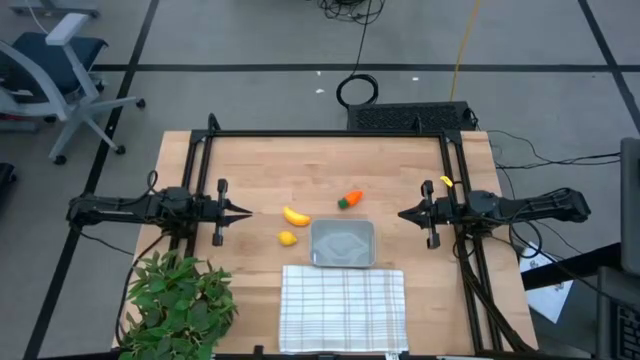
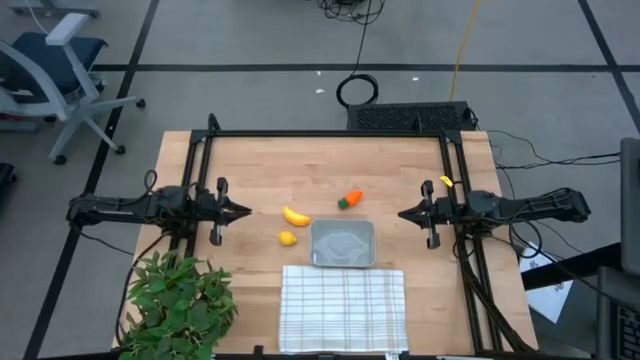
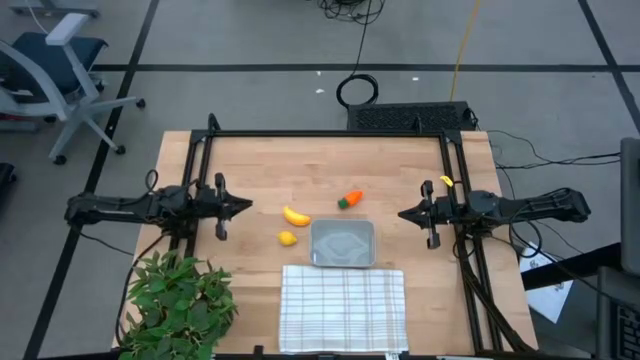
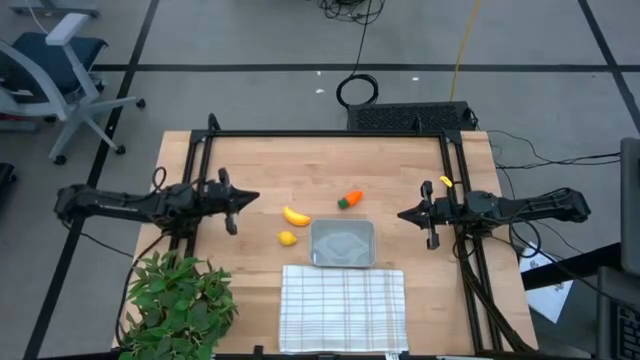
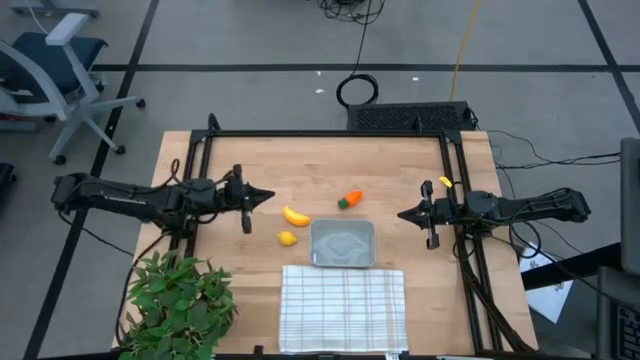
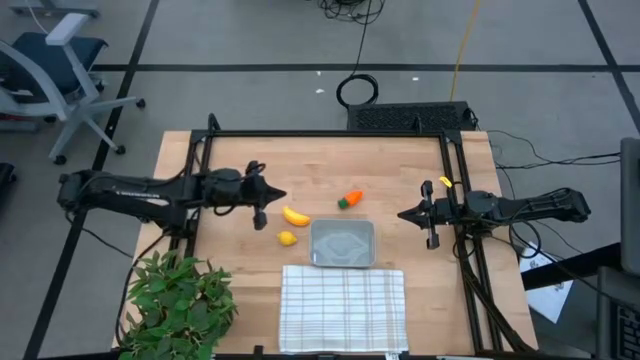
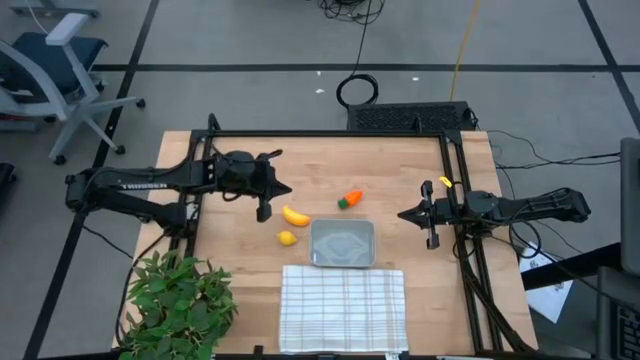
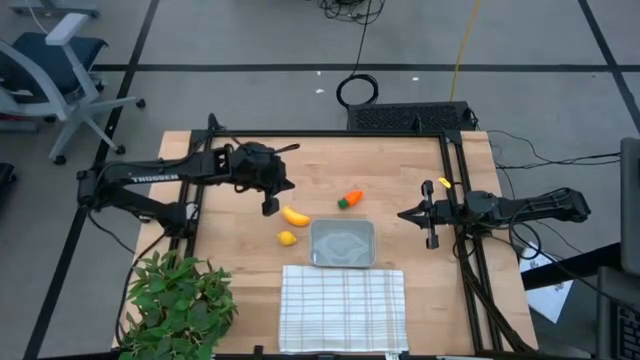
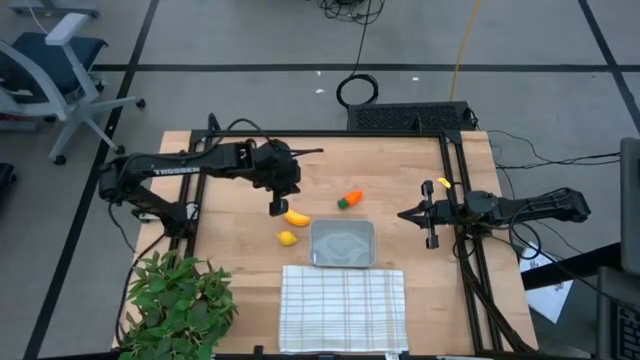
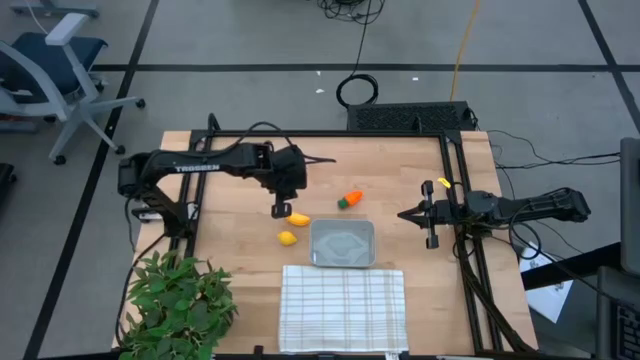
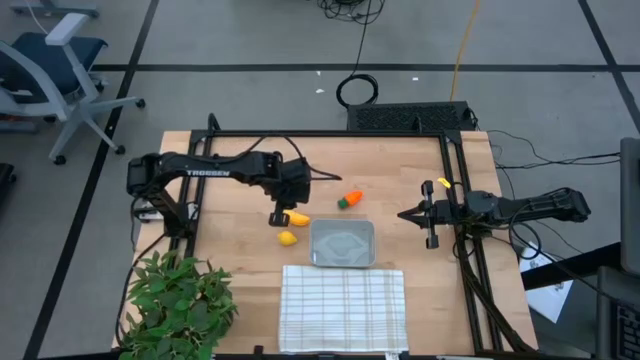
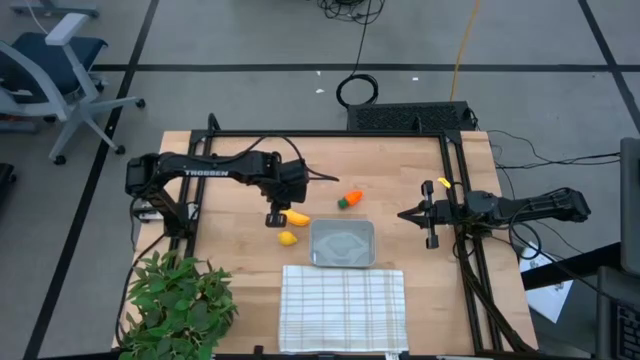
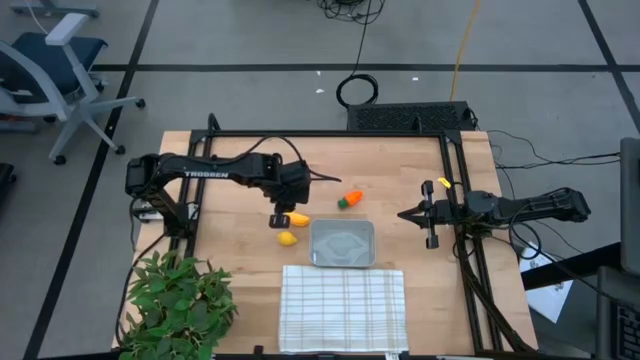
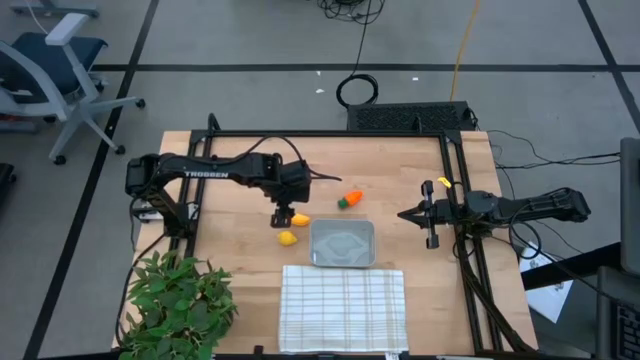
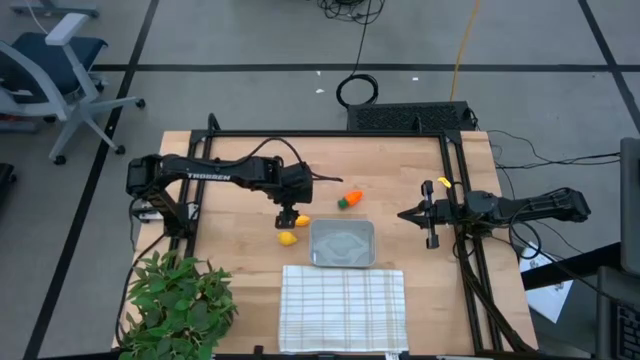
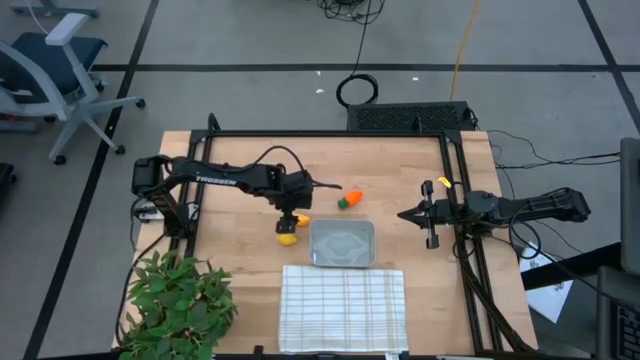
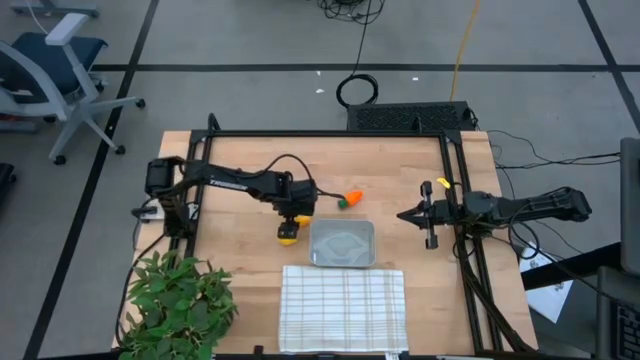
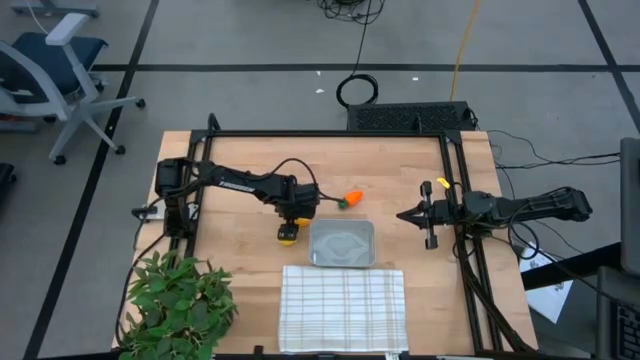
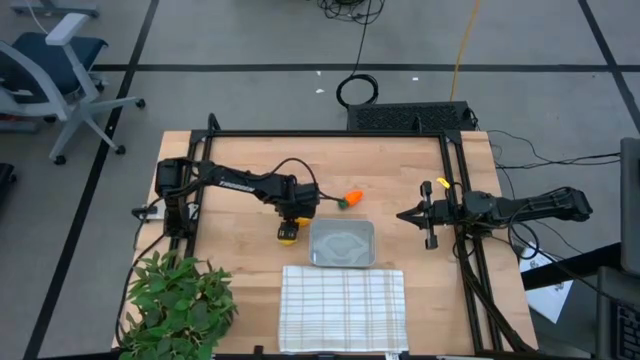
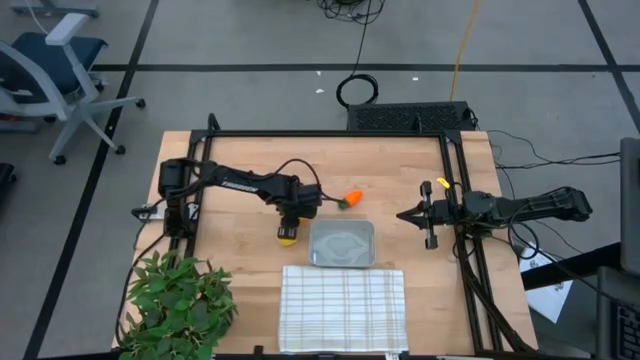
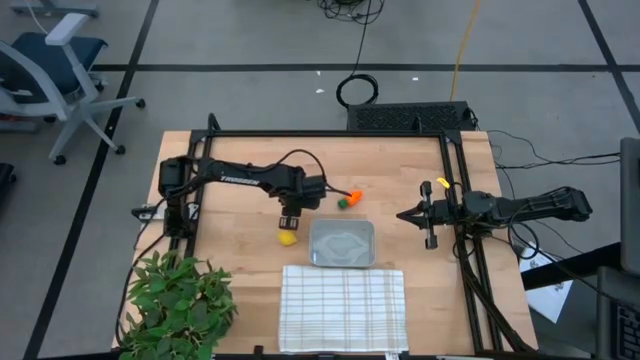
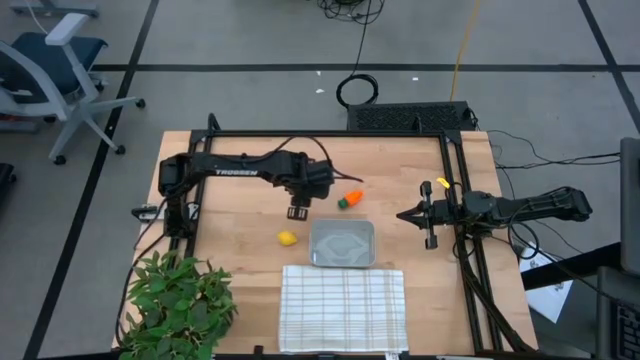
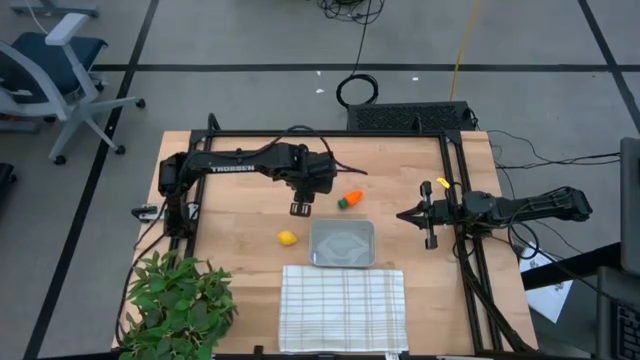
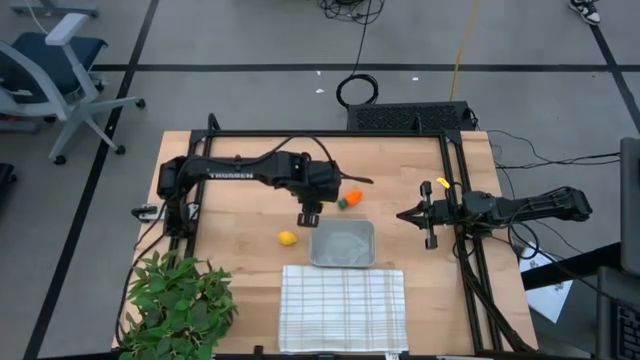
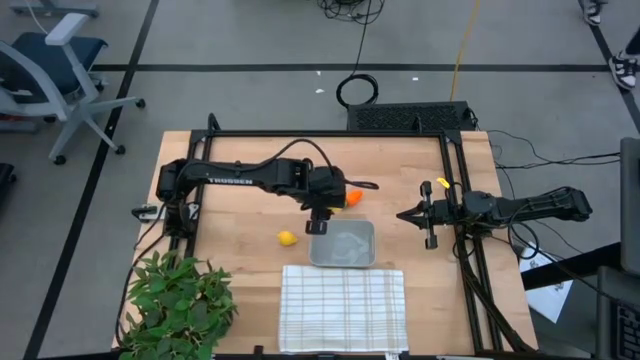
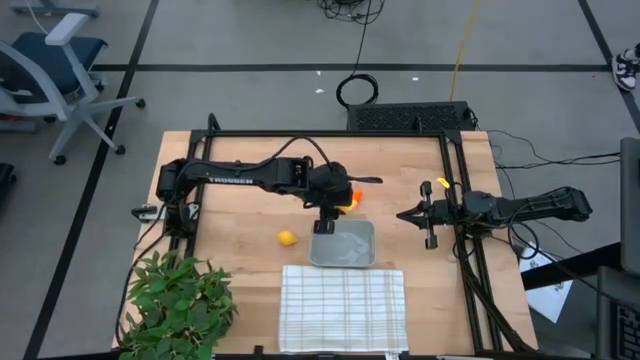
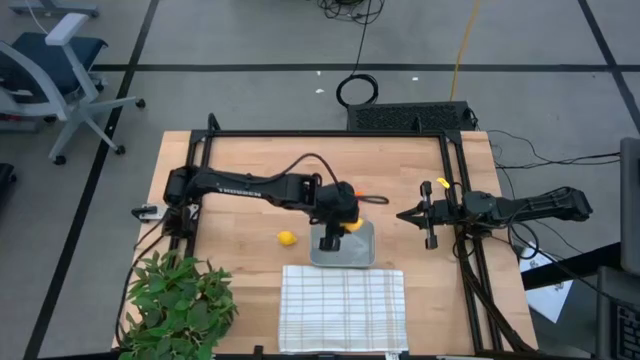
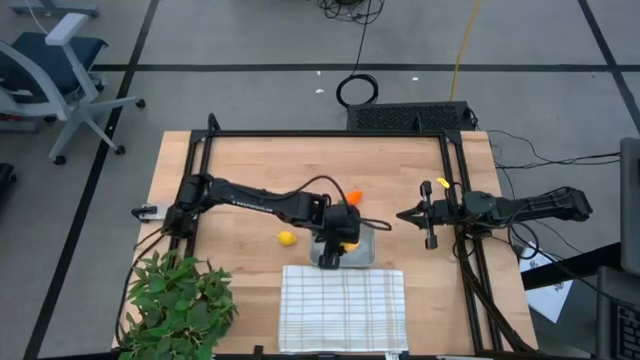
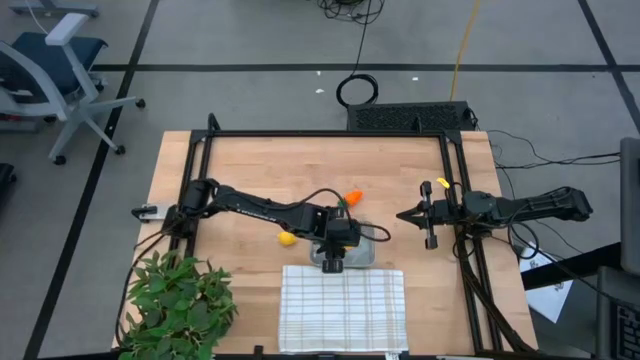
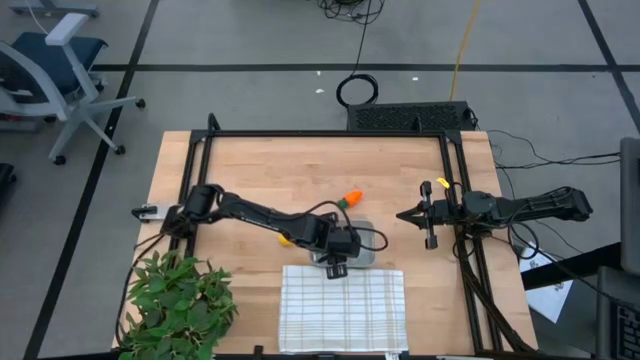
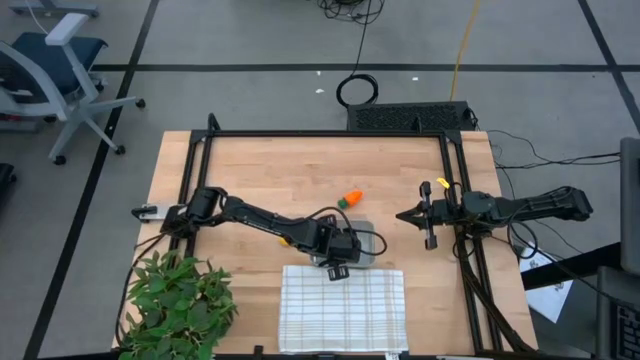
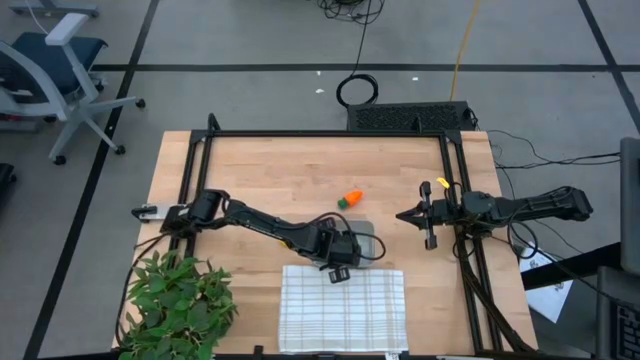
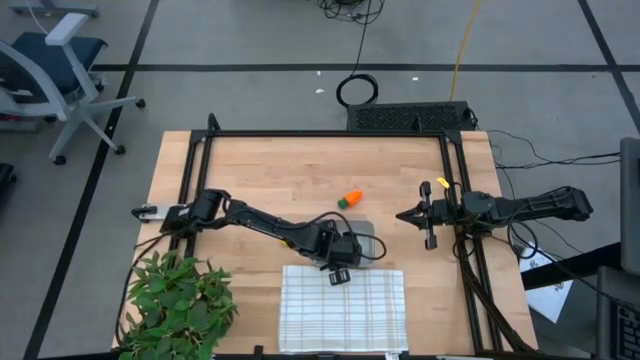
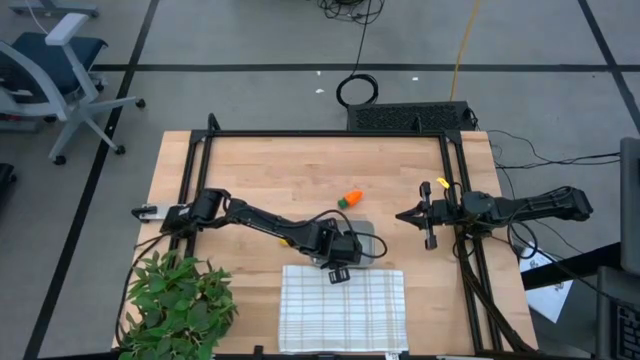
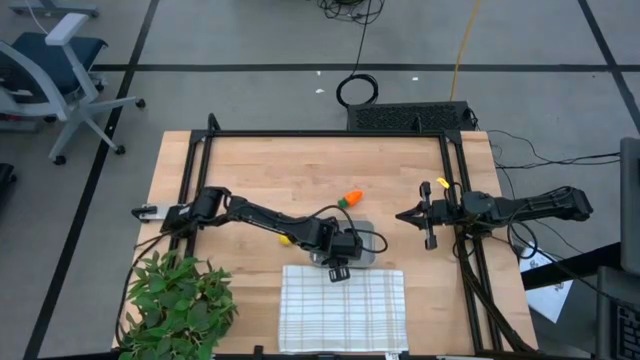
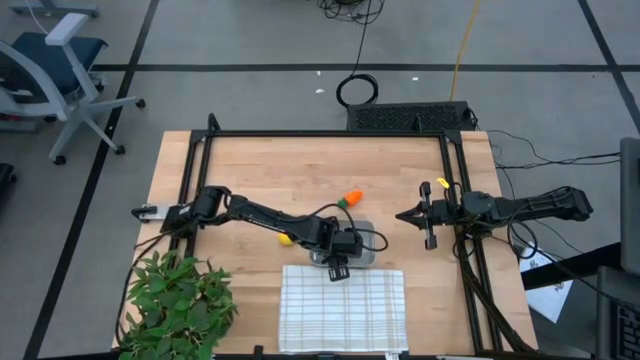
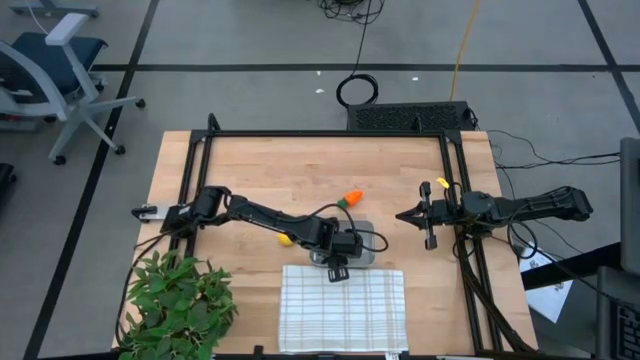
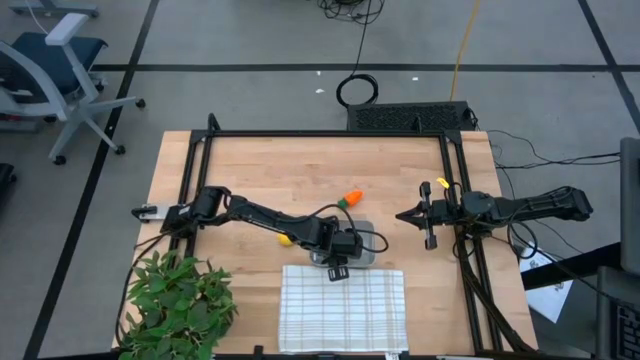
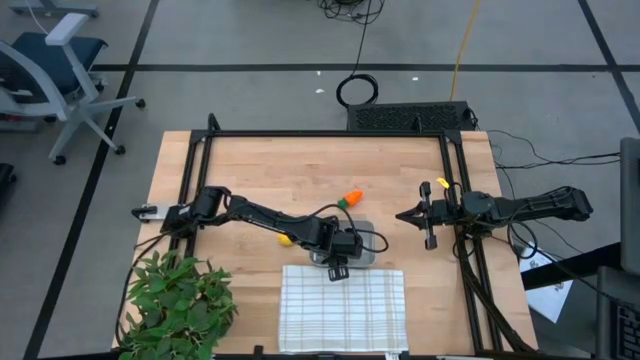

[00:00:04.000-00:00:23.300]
Task: Pick and placing Produce into tupperware
Put the yellow banana into the gray bin
